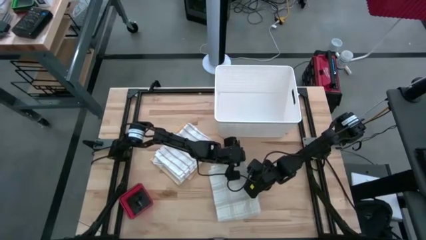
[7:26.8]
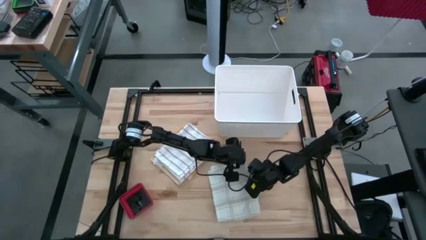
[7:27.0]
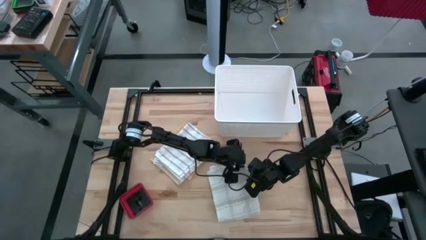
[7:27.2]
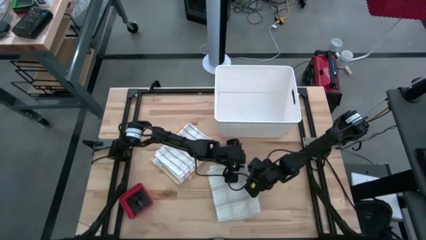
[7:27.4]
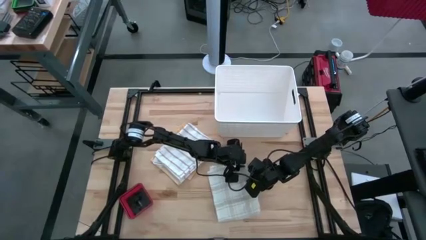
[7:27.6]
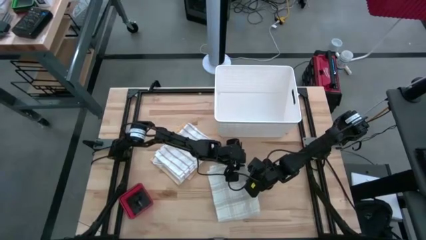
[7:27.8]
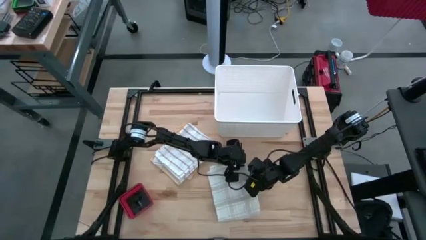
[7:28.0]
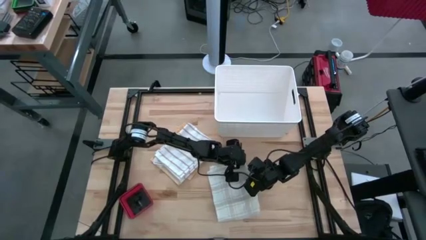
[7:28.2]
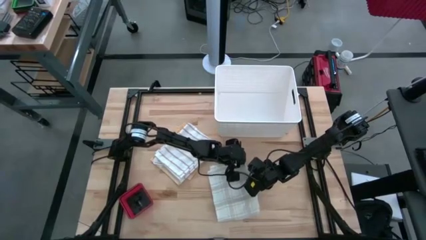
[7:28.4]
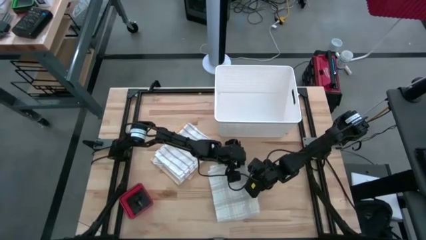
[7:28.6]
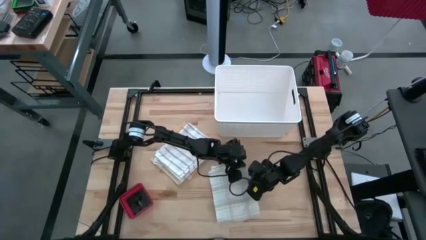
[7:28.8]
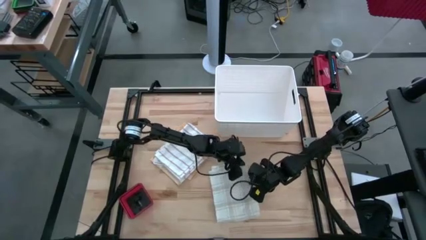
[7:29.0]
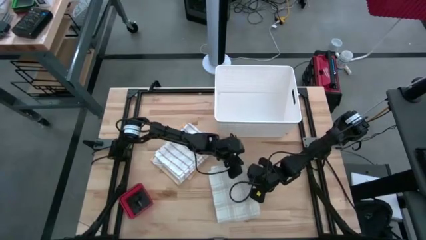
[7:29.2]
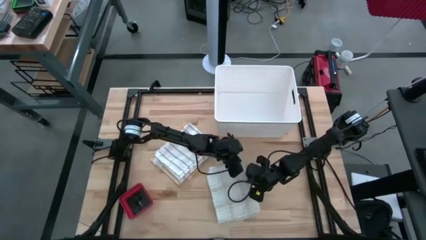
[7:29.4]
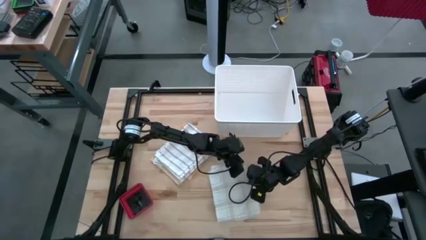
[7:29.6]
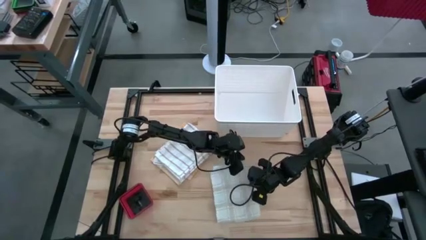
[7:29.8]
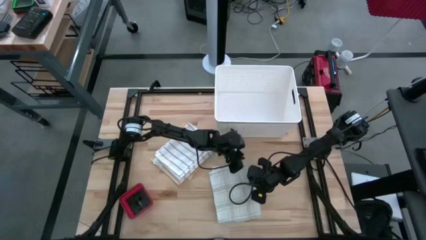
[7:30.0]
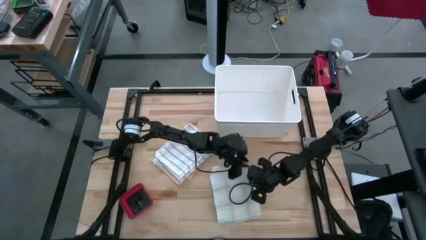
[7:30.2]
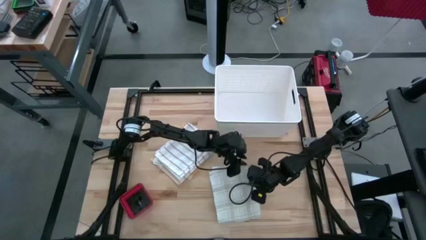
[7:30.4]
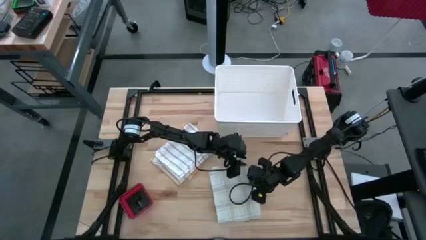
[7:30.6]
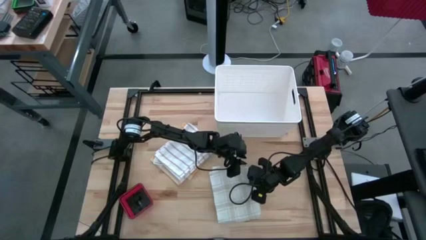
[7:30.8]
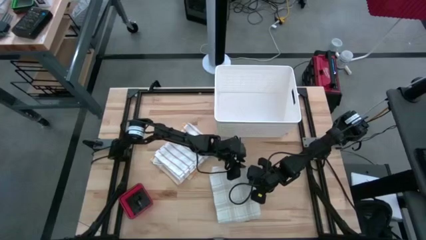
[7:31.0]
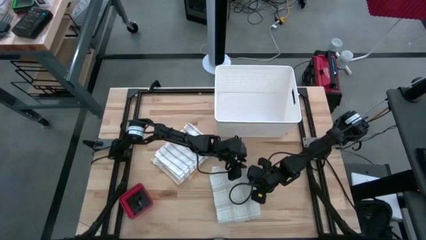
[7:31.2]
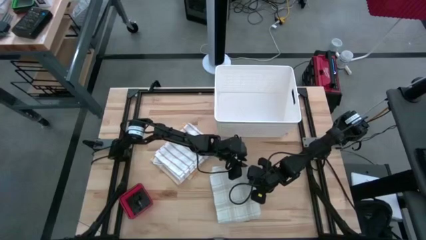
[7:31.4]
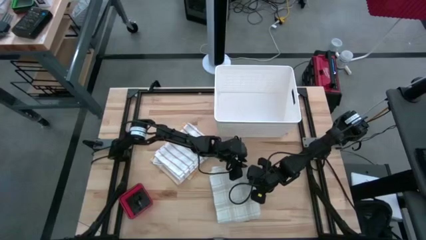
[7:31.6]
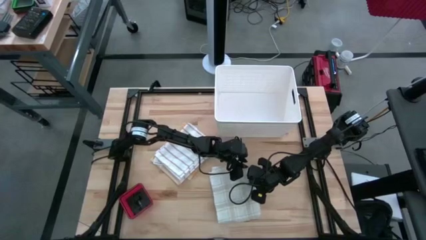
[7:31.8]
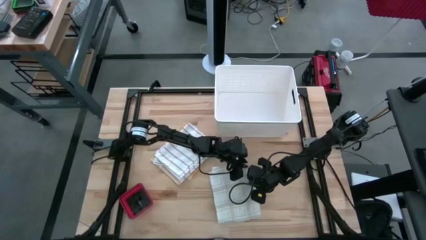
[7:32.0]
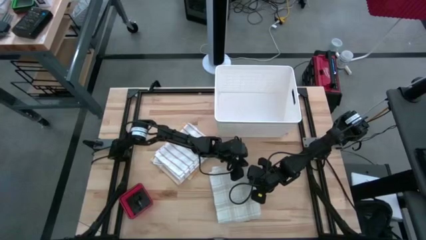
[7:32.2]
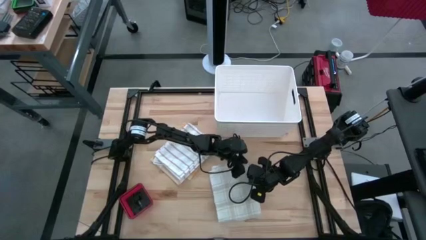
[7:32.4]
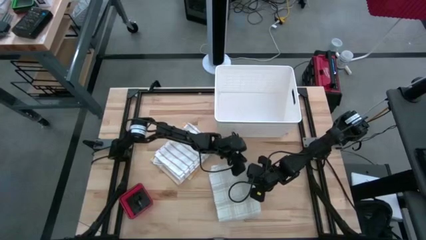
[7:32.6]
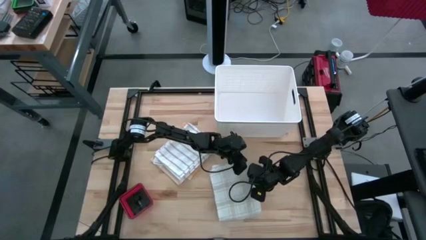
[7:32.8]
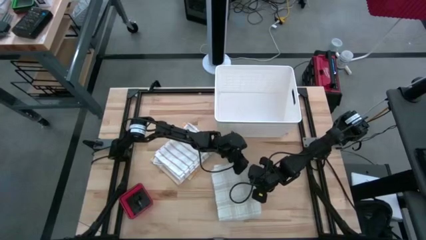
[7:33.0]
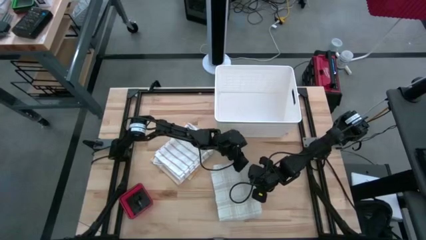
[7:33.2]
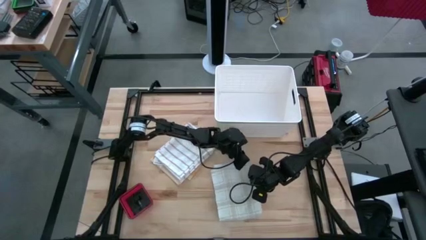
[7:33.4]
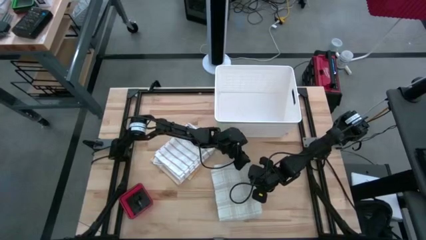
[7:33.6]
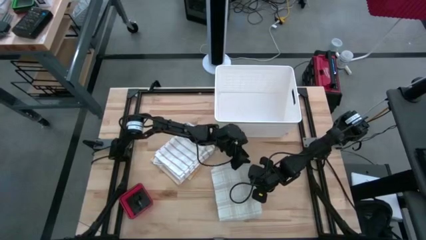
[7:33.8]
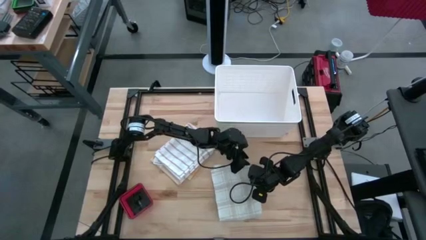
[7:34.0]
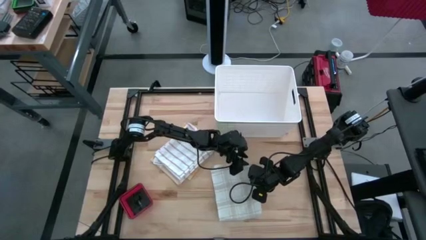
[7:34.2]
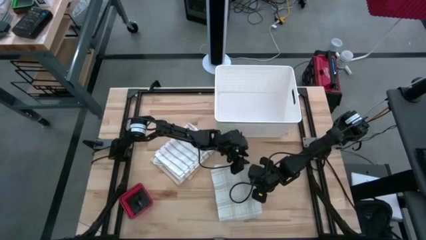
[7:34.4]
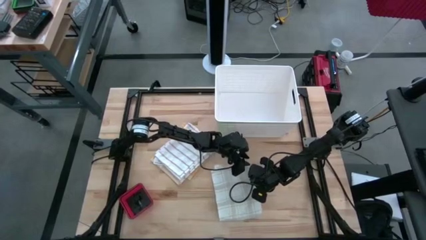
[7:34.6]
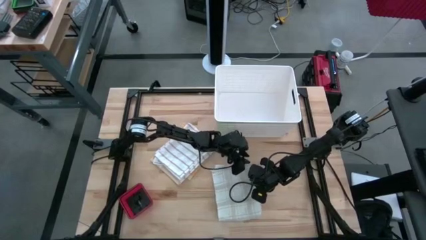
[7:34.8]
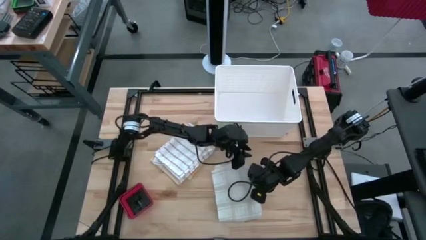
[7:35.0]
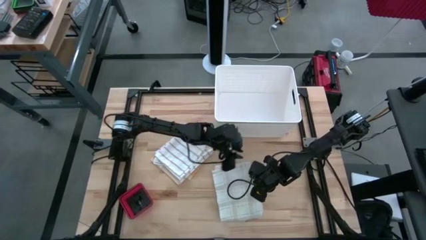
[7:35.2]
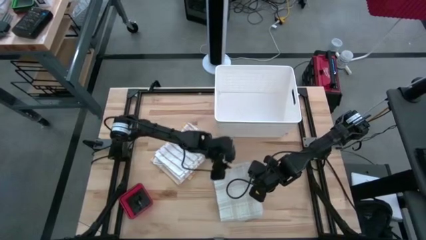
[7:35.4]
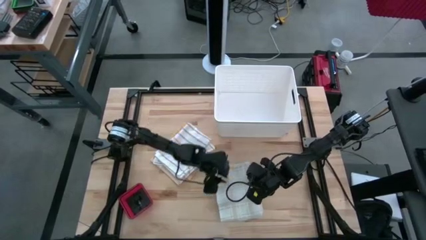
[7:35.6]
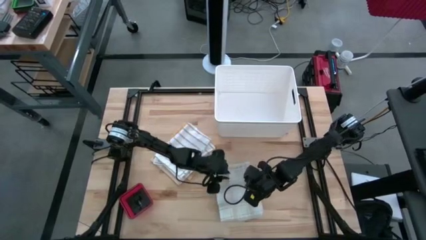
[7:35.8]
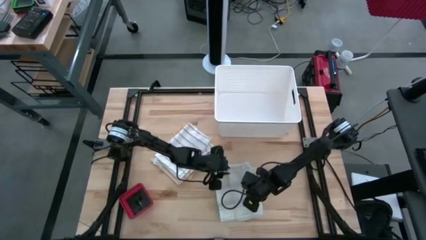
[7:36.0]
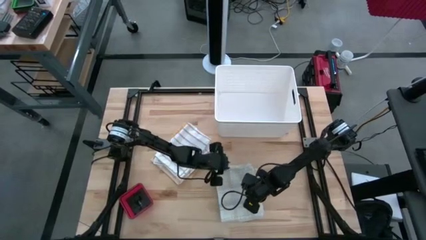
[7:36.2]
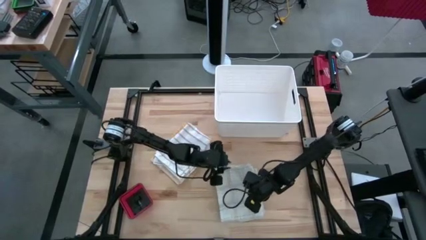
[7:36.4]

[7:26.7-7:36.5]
Task: Fold towel
Fold the light gray patterned towel
